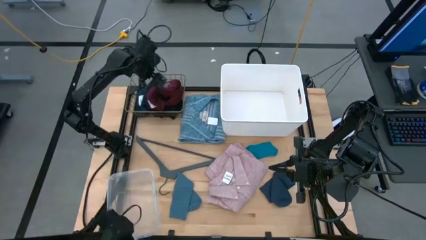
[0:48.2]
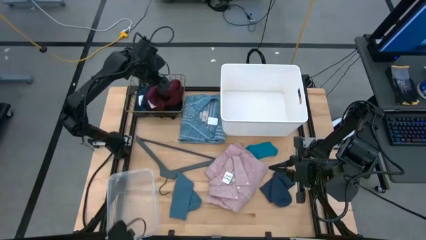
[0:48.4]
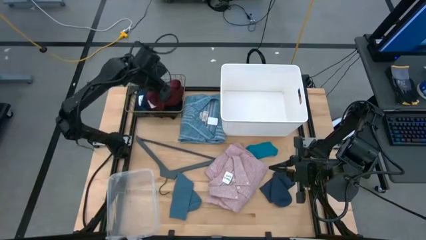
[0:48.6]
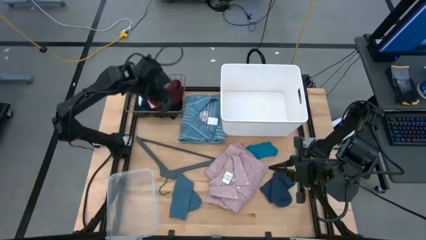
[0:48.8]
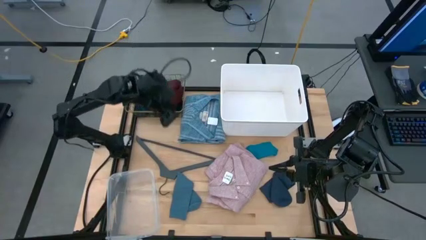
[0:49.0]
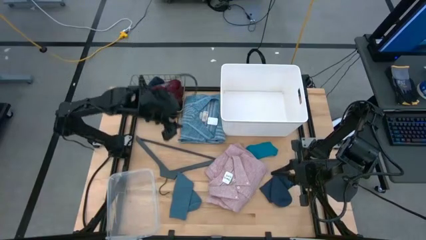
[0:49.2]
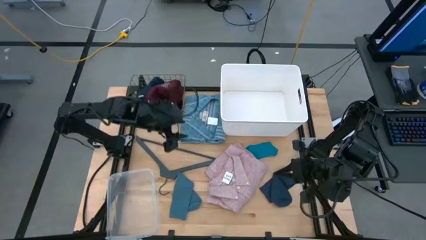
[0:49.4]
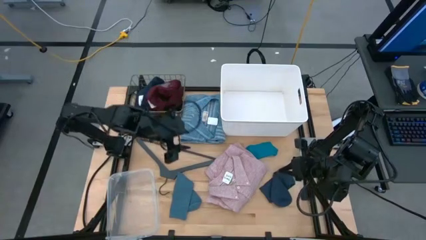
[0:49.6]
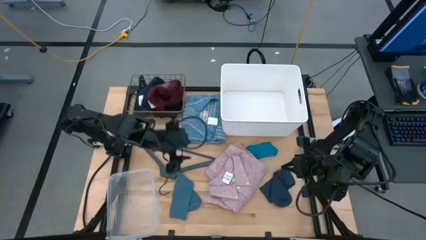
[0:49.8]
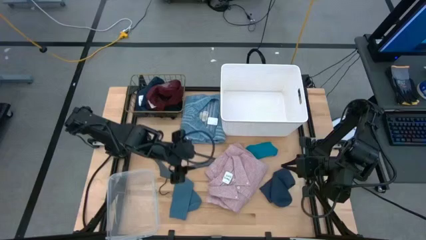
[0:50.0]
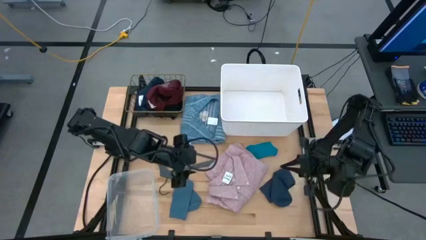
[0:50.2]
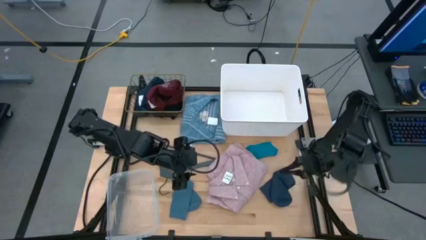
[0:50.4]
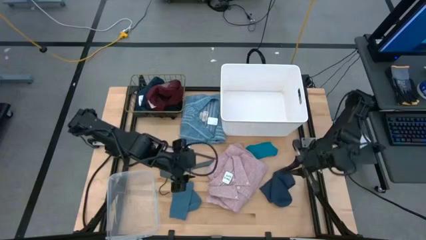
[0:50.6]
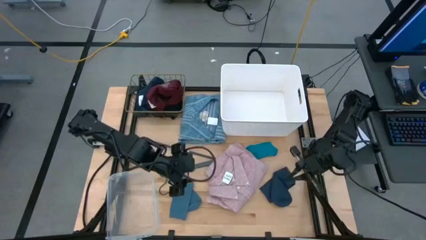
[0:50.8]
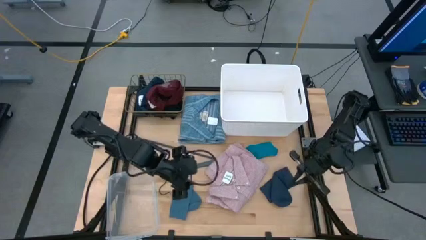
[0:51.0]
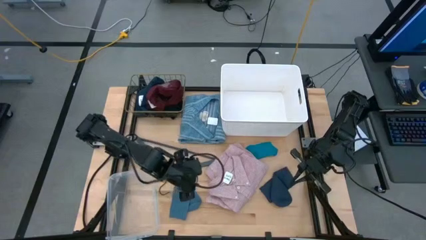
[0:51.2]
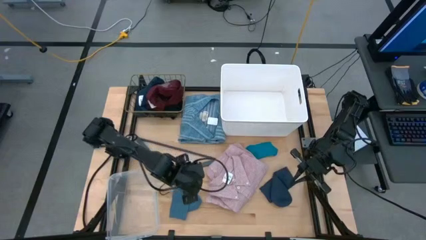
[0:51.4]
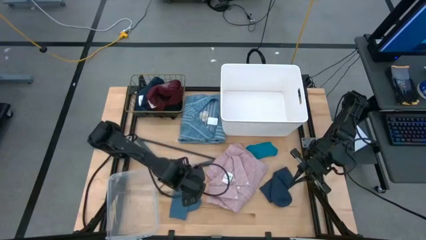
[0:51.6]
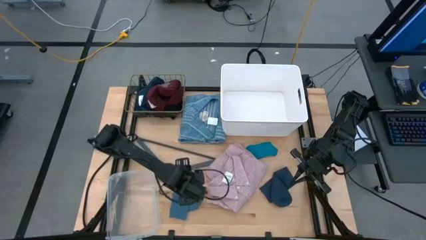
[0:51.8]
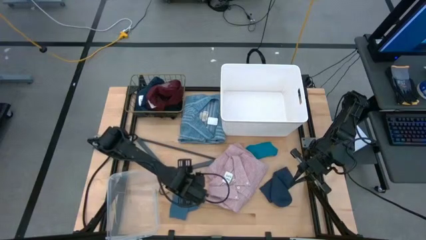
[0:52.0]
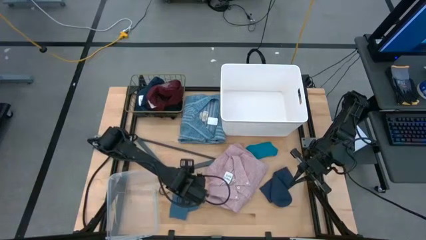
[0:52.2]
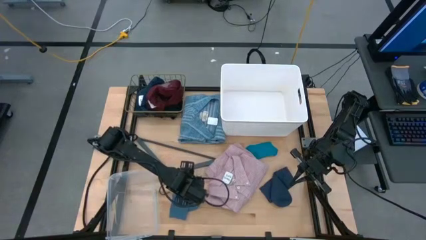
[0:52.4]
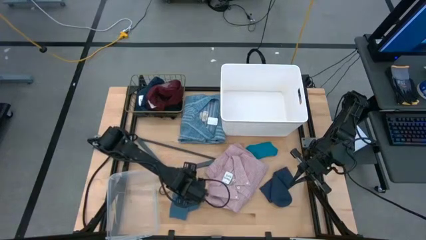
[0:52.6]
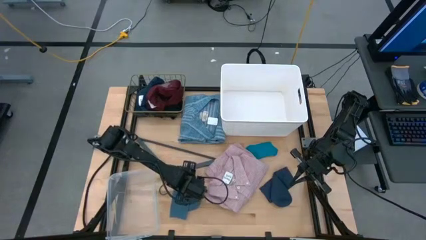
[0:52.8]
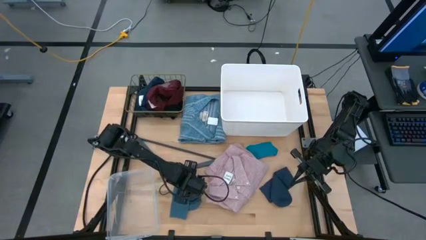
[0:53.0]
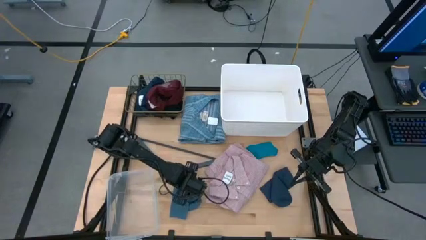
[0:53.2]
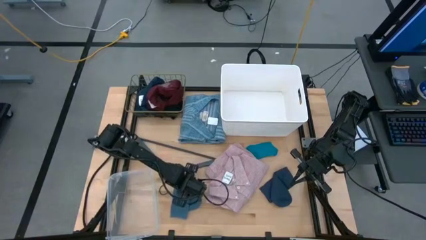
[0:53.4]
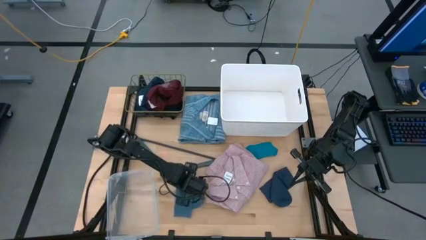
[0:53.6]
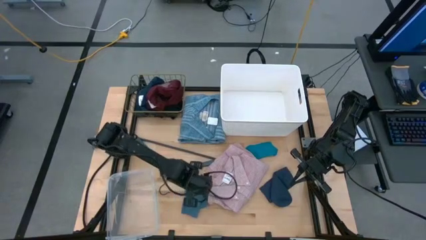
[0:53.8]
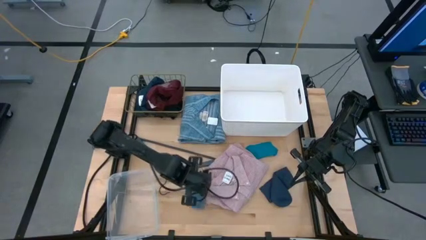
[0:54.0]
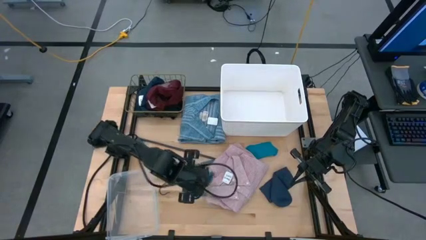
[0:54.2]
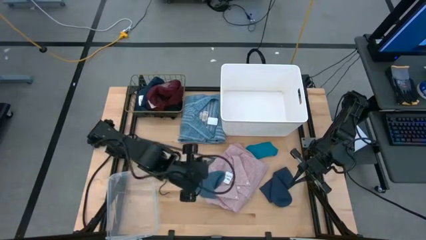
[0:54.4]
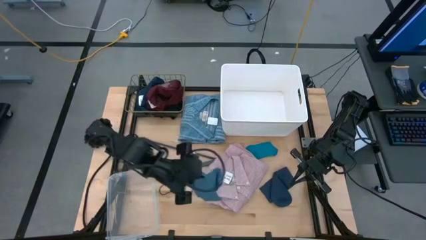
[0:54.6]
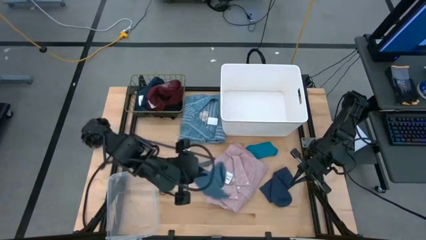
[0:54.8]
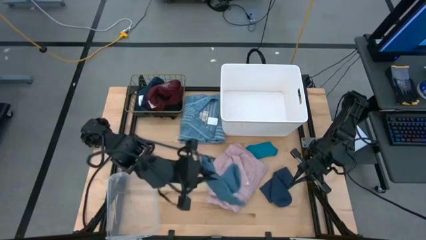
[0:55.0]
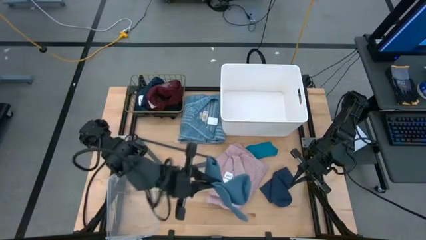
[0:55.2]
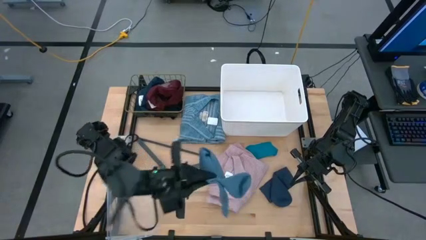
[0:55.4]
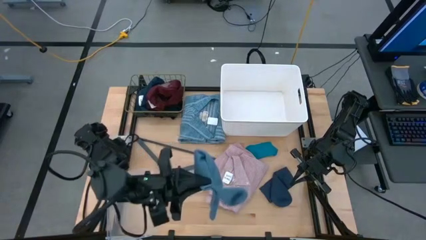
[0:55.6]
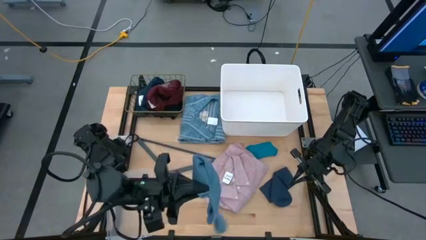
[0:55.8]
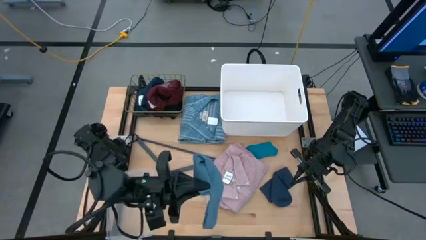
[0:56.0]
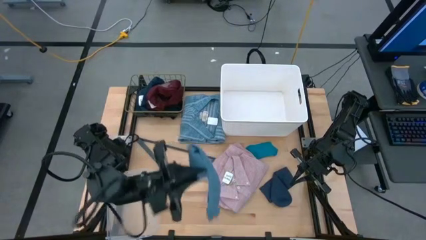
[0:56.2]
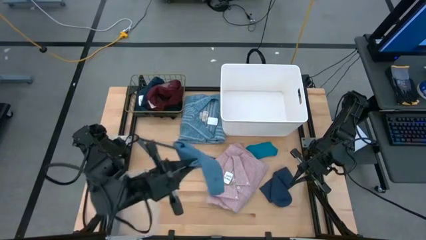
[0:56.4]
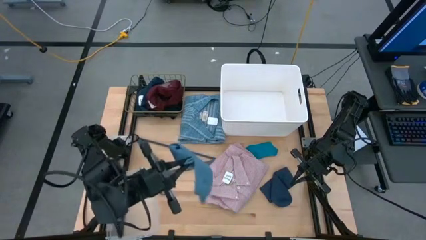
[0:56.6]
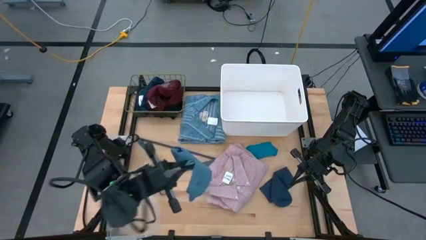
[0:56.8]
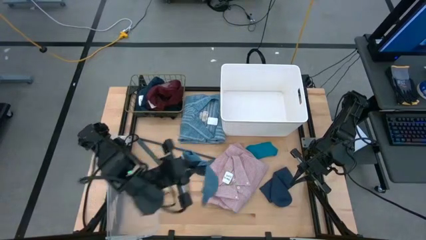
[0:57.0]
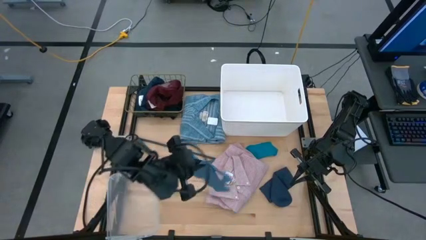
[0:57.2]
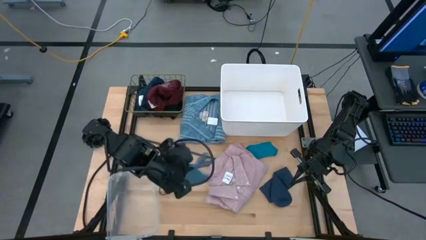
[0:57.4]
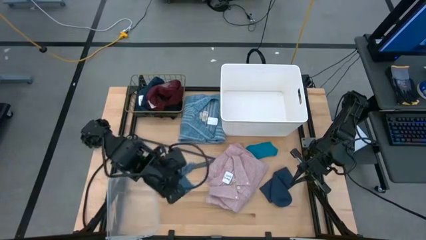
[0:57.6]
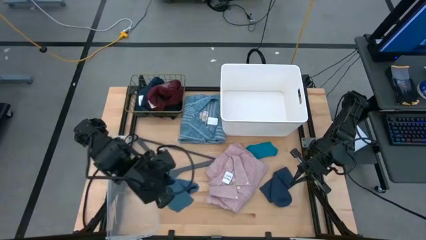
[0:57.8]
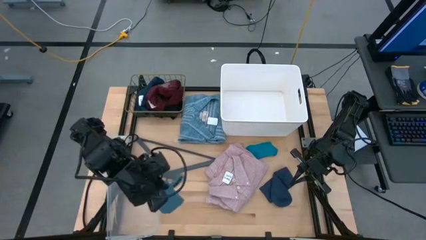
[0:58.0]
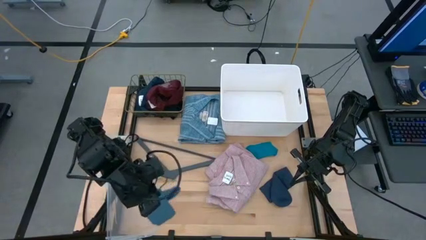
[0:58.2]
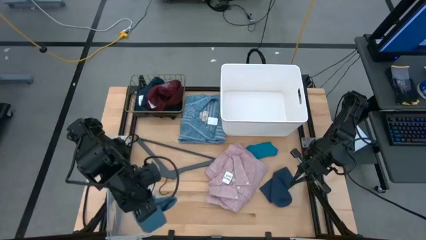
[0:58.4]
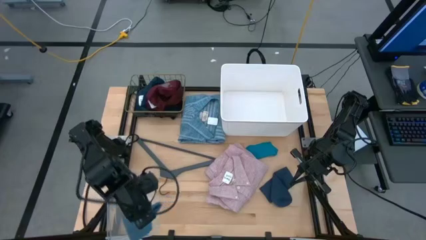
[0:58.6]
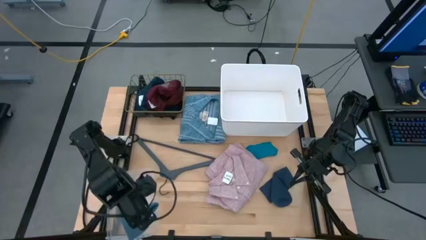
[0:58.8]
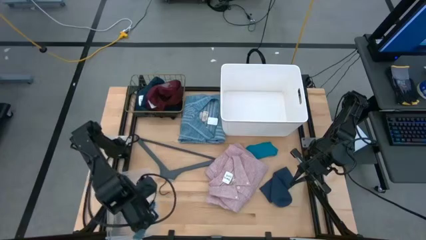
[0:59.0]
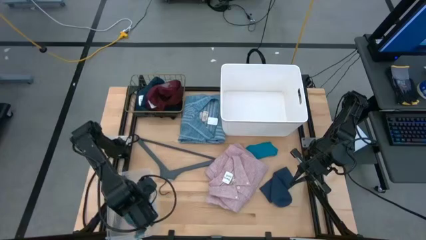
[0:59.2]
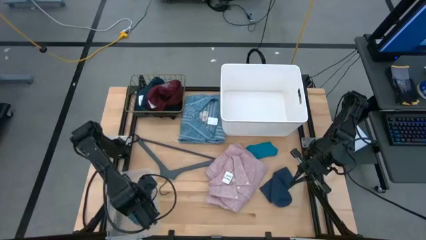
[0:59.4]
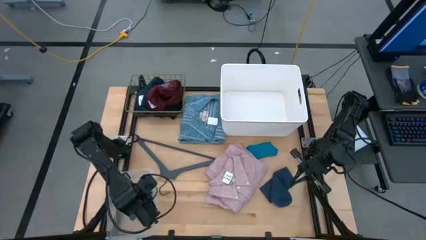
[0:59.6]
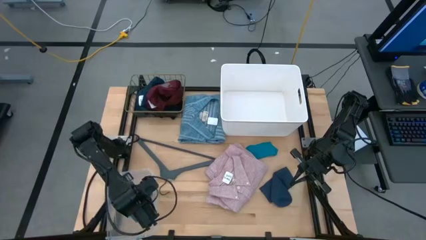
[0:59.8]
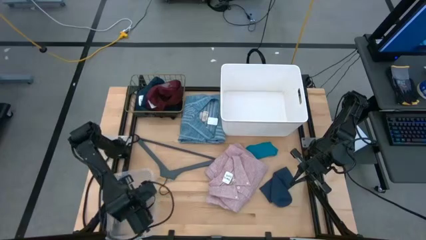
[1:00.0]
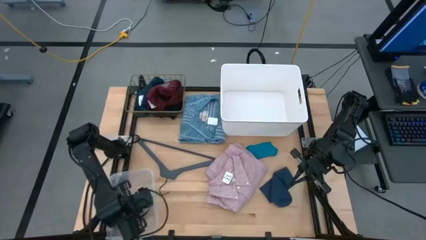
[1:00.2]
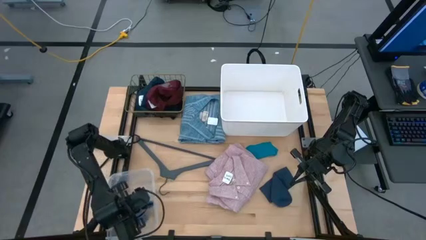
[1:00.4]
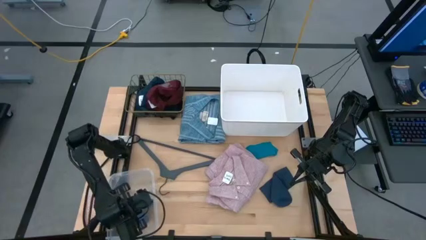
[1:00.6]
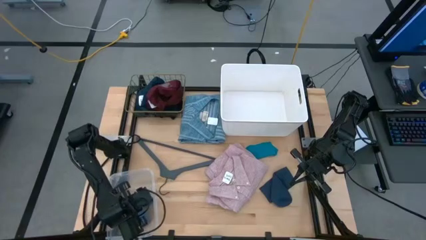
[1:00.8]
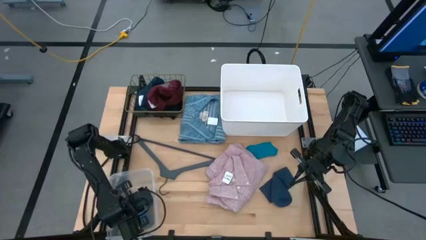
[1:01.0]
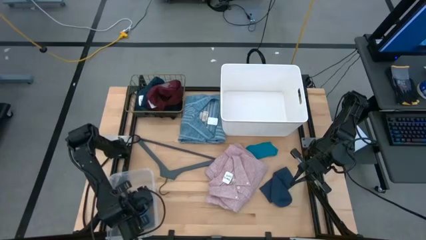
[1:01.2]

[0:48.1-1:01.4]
Task: Pick & Place Cloths
Put the blue sock into the transparent bin
